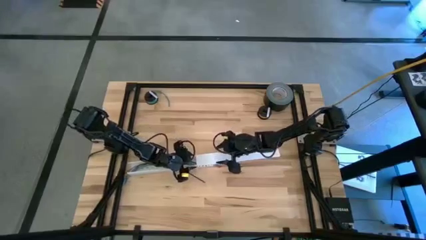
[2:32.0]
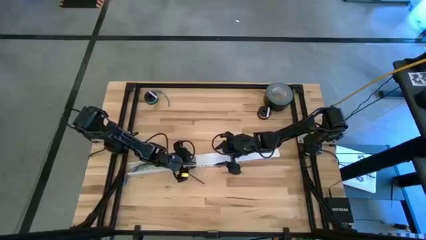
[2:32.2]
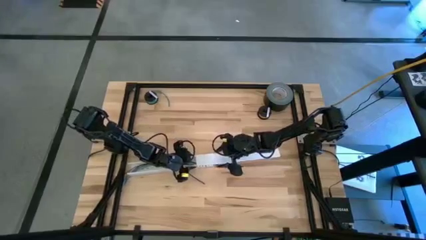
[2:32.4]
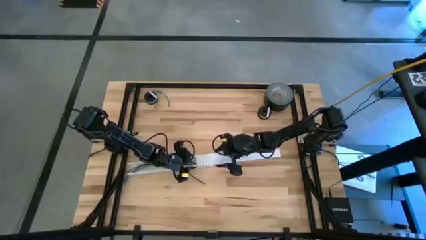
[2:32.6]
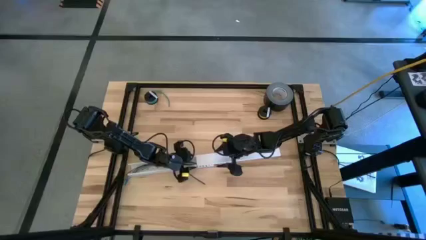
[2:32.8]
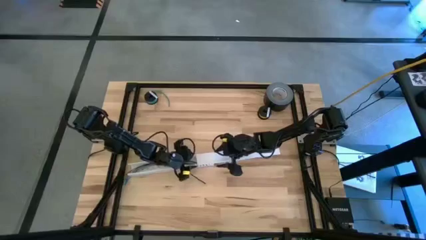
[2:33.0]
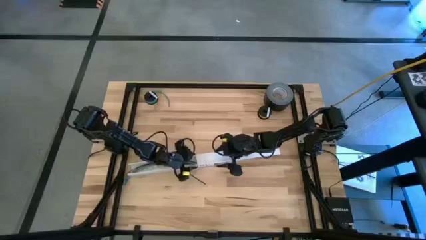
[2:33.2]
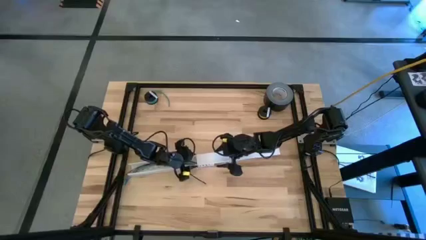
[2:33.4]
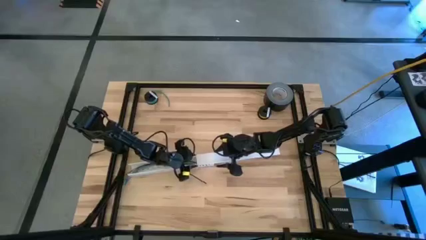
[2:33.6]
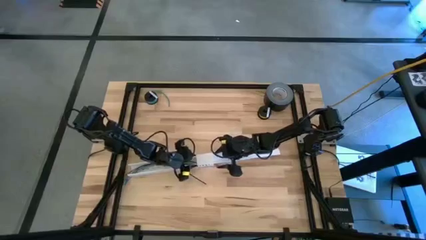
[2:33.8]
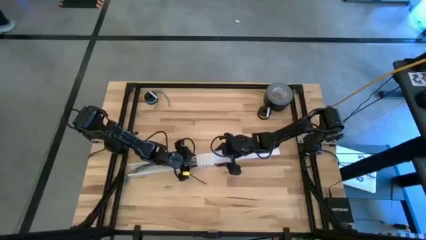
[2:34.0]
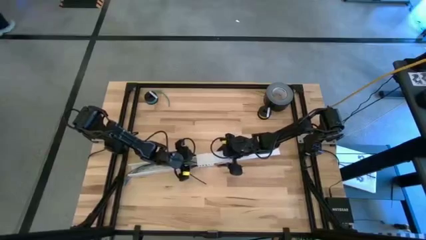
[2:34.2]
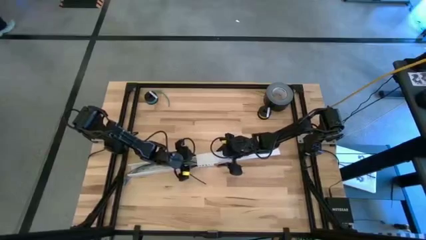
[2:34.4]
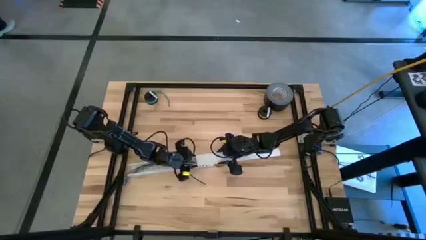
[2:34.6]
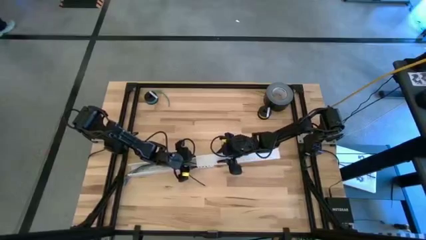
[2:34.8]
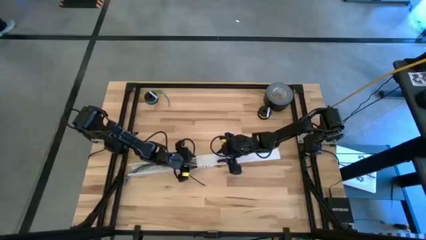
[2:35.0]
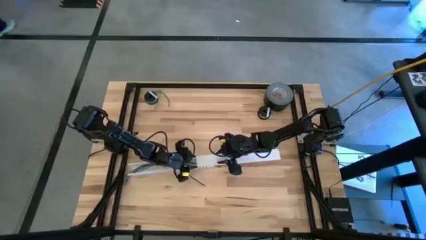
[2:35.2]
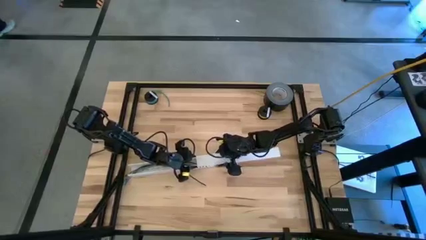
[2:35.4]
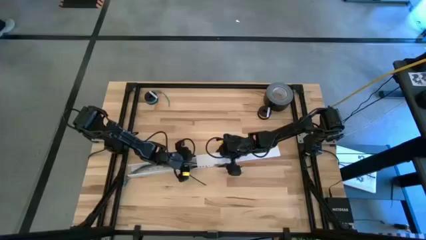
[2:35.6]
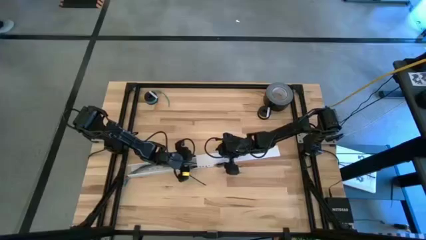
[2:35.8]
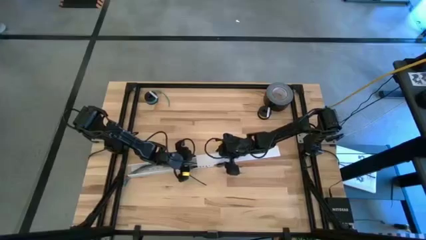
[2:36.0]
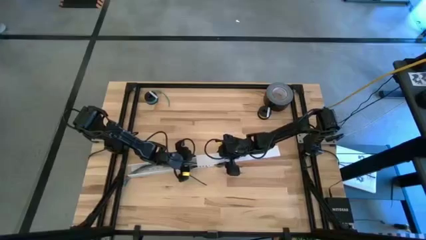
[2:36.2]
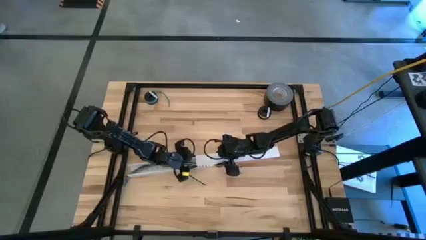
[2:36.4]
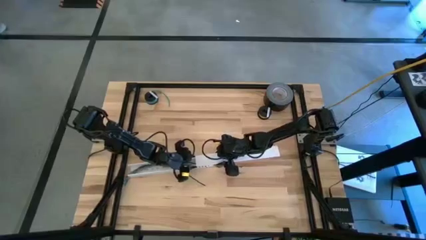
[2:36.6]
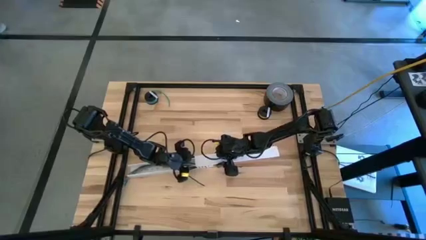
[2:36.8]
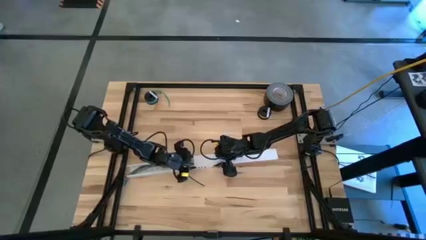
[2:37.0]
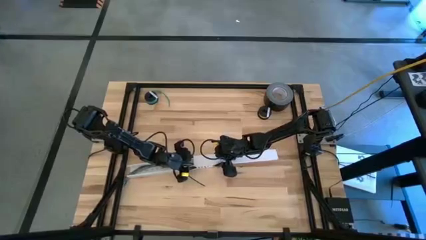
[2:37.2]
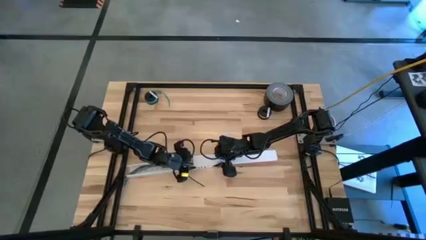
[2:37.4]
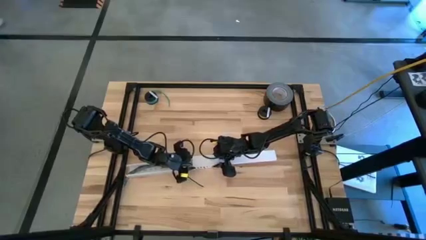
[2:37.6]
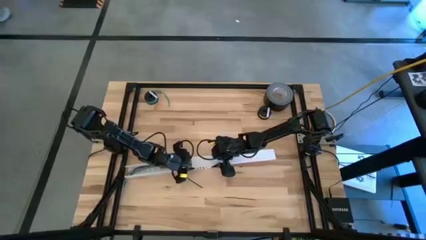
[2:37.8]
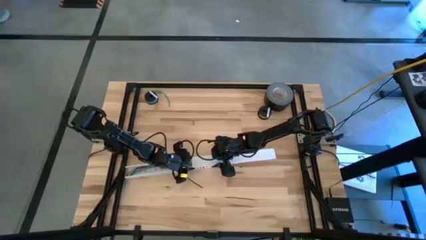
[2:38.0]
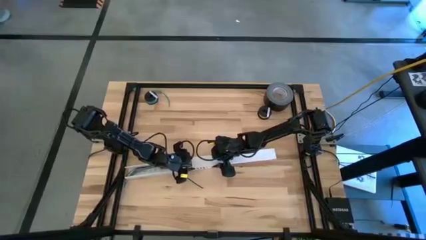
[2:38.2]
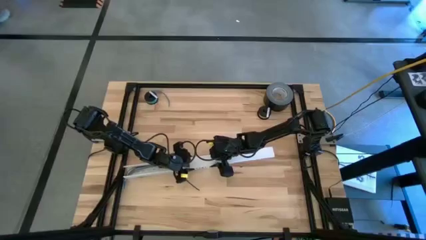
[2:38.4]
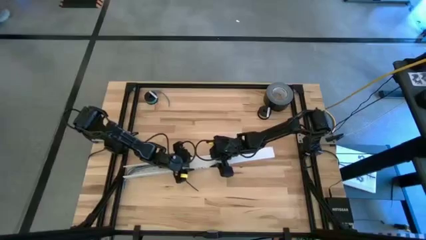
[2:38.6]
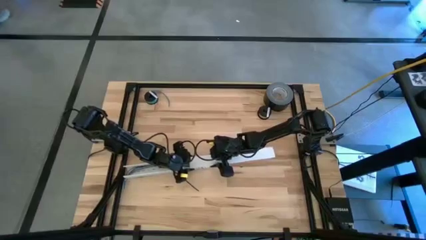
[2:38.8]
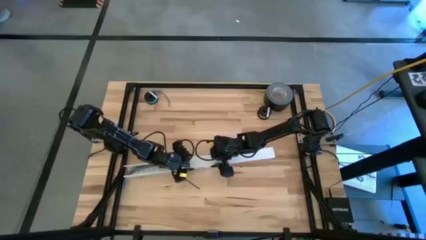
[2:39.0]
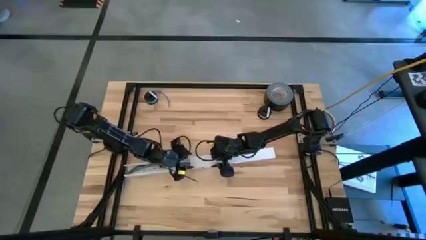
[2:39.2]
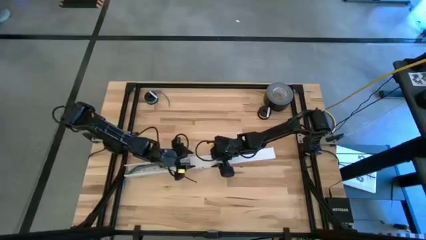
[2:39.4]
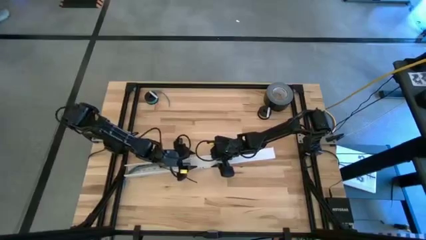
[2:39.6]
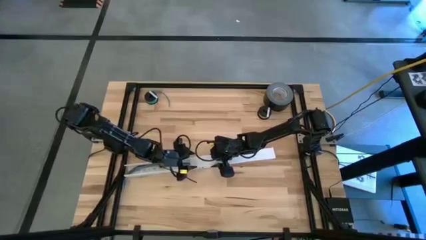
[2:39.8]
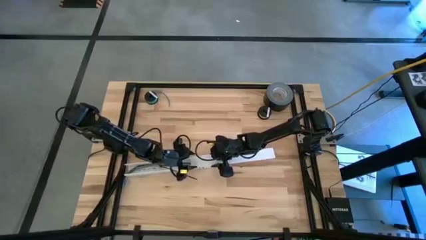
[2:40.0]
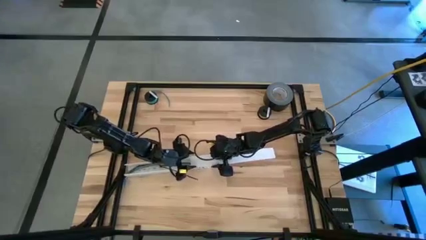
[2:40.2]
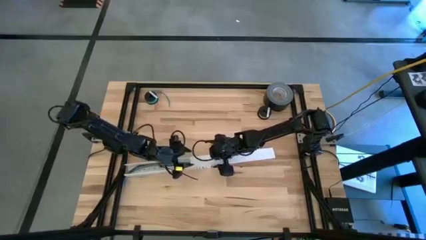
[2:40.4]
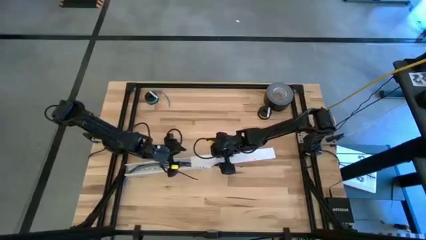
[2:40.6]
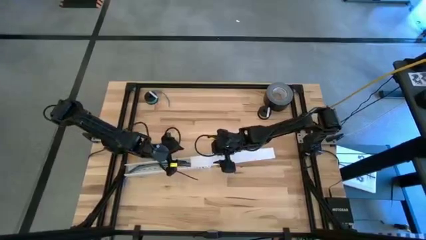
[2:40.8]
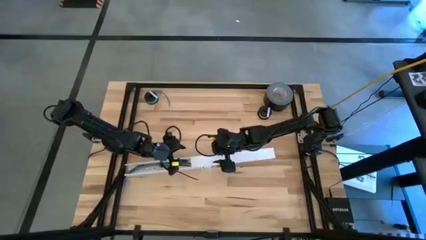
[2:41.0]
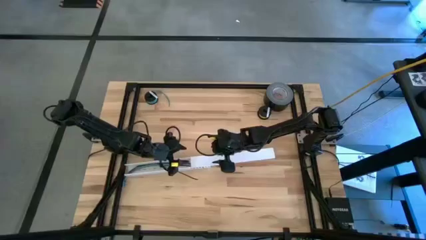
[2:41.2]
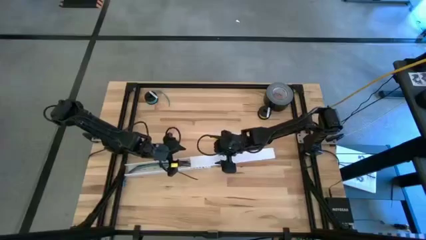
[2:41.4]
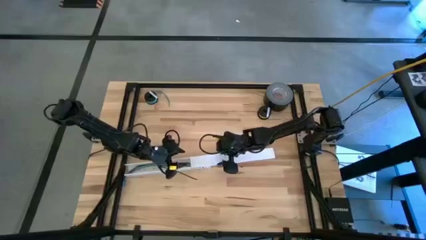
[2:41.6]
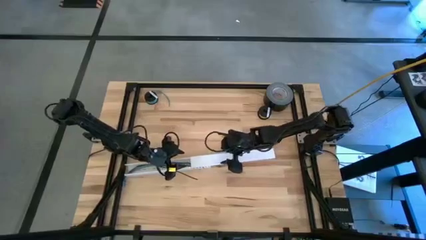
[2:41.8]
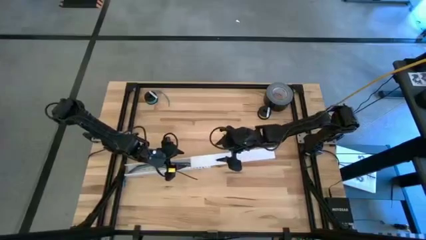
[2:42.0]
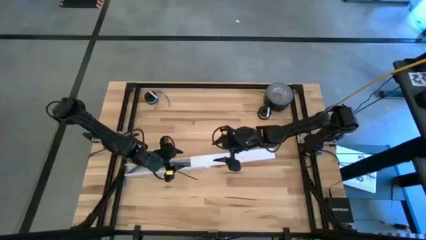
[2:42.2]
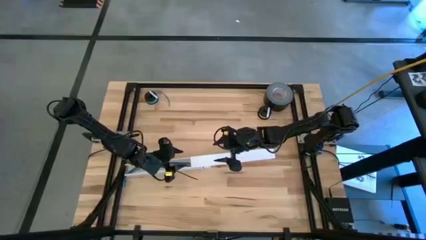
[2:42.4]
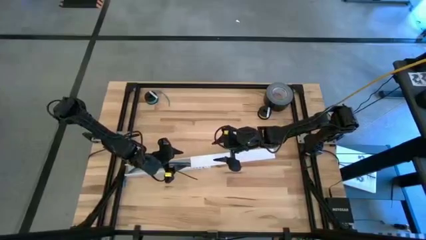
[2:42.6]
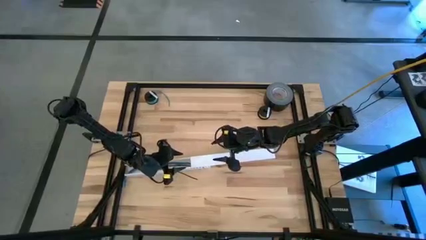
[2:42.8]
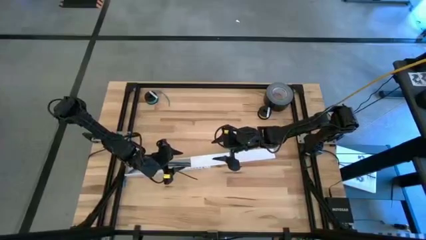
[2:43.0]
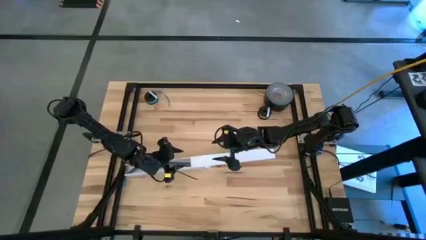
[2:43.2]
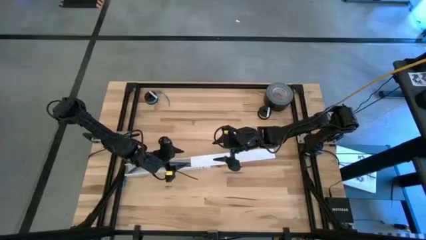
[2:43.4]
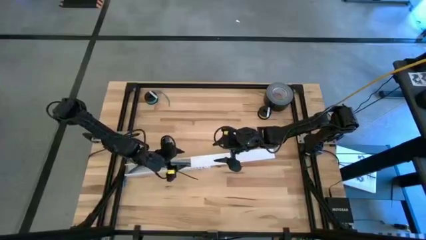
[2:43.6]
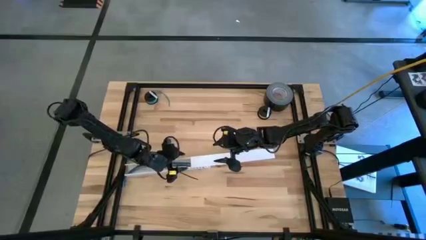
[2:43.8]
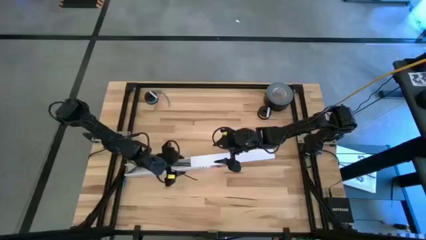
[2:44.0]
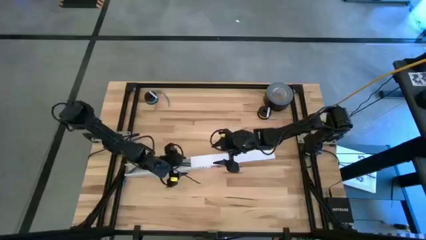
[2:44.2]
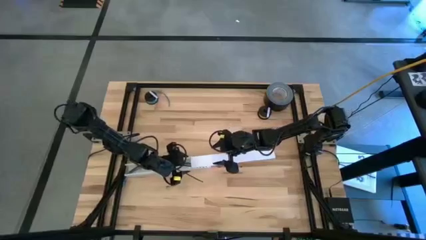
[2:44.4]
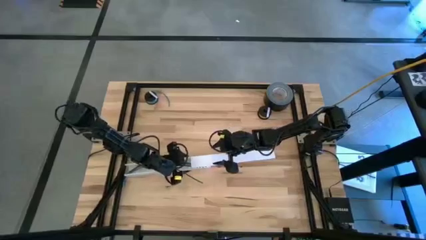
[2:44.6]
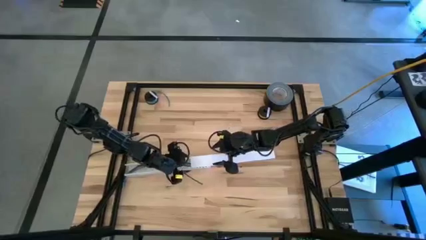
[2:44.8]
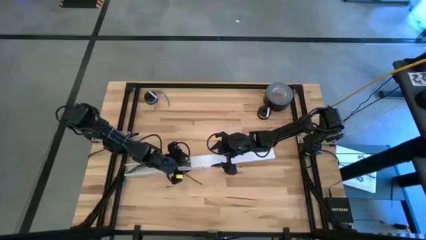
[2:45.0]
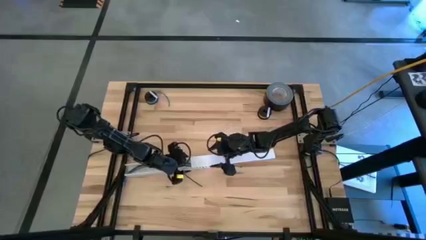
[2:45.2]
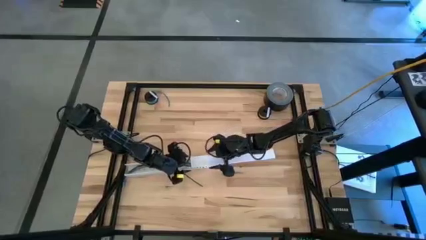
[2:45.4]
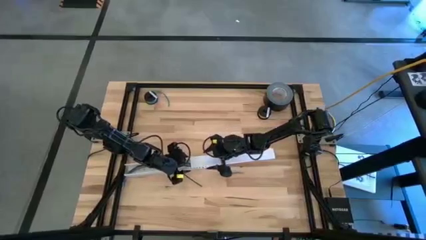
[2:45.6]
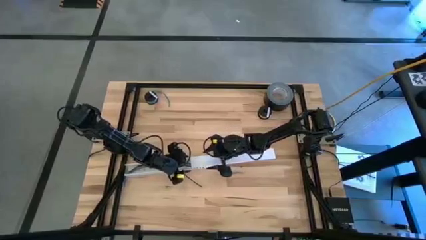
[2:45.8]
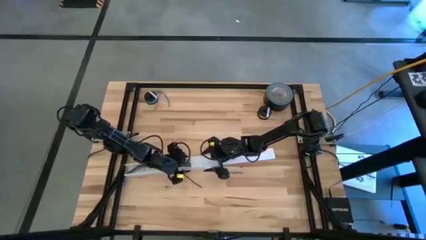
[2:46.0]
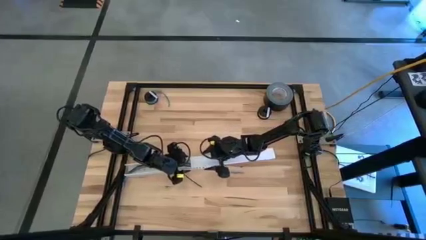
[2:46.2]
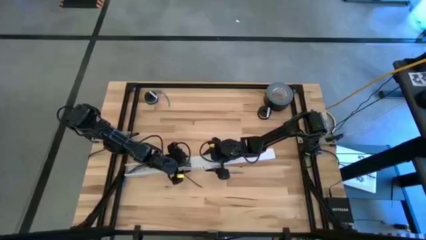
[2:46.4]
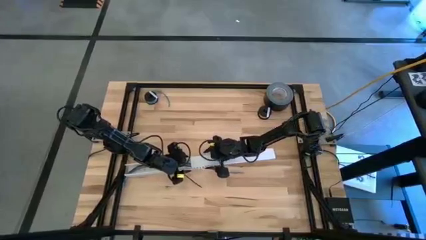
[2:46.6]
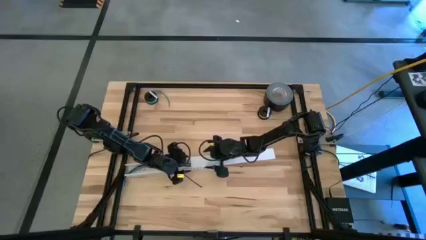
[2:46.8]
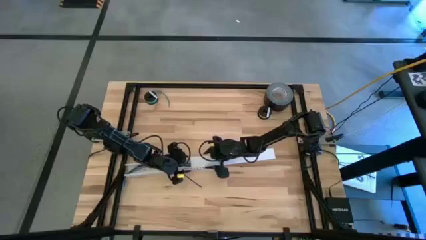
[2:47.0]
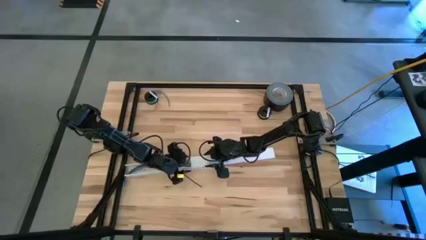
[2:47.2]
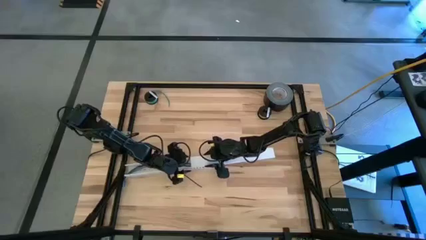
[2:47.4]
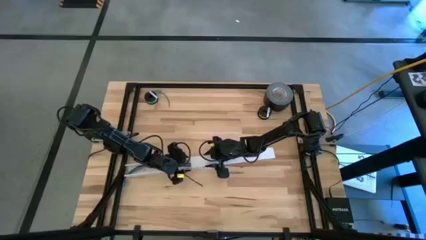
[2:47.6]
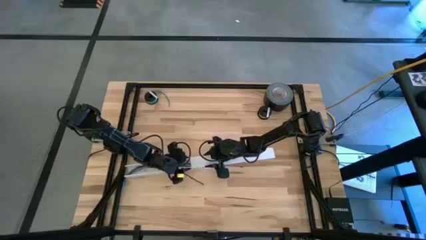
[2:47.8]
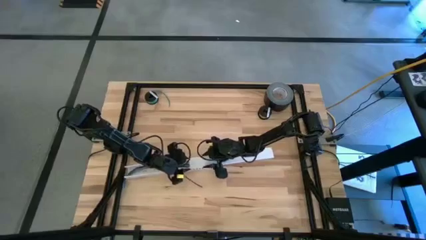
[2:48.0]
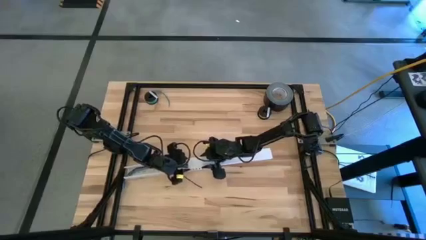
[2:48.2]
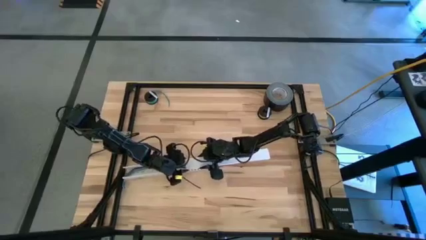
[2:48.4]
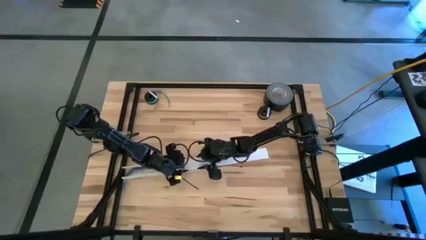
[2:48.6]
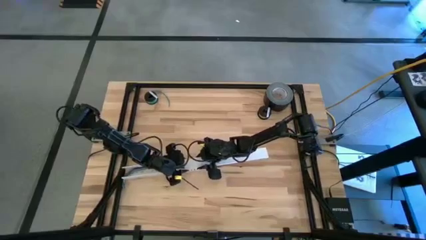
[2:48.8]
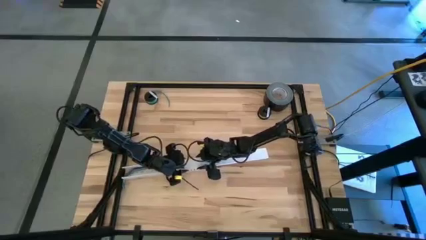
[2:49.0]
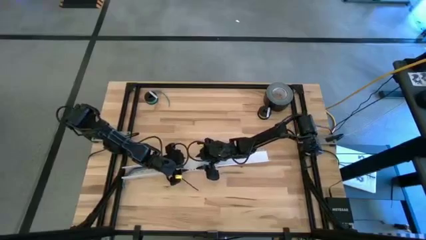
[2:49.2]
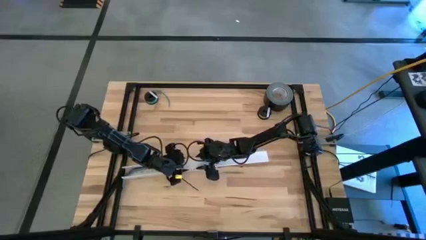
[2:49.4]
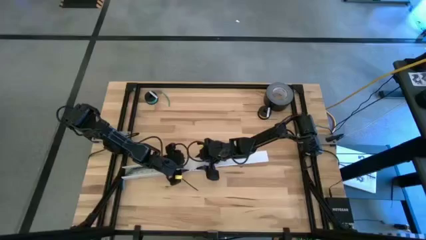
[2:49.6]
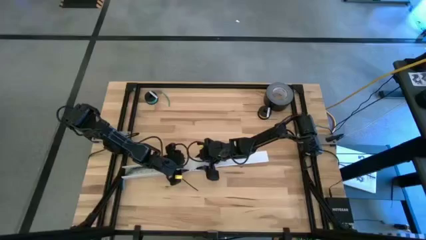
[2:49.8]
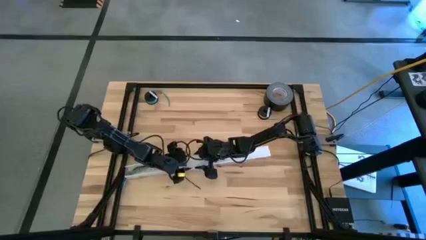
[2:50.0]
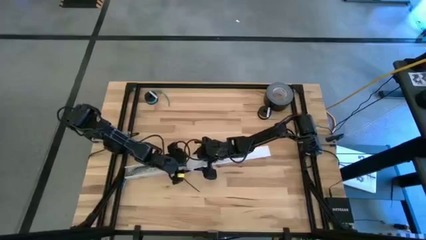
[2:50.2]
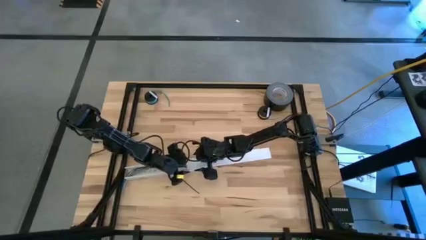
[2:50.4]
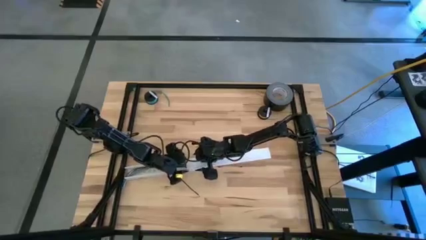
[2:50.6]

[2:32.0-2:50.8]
Task: Ziptie cables
Close the white cable duct
